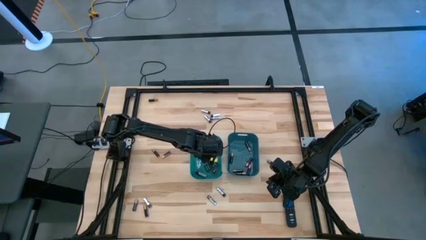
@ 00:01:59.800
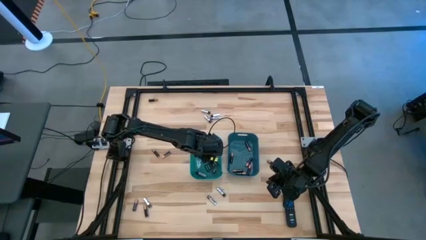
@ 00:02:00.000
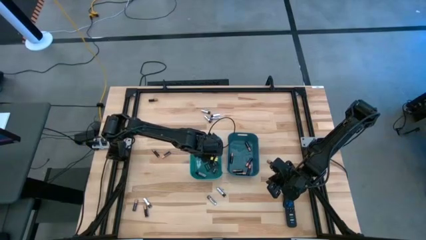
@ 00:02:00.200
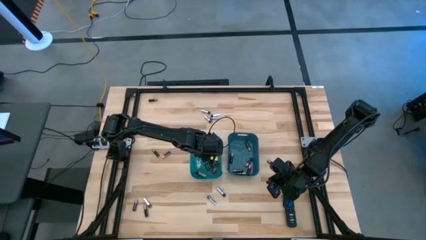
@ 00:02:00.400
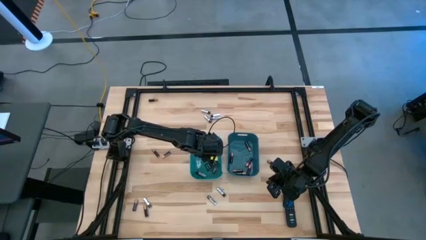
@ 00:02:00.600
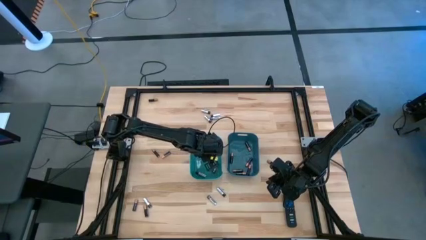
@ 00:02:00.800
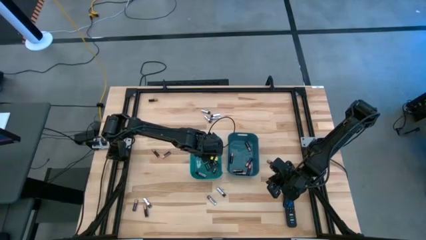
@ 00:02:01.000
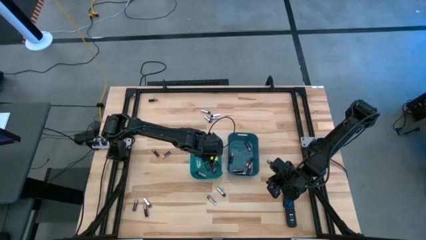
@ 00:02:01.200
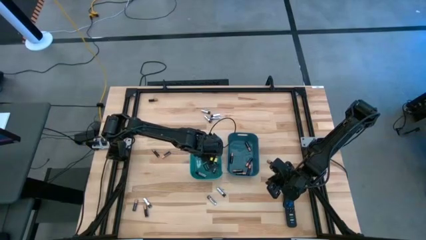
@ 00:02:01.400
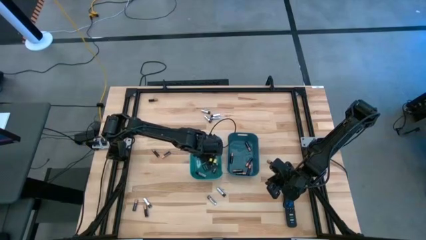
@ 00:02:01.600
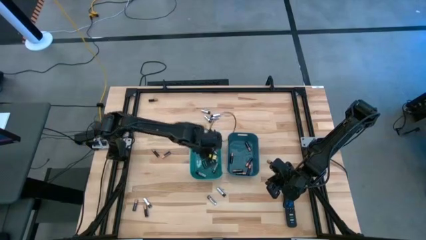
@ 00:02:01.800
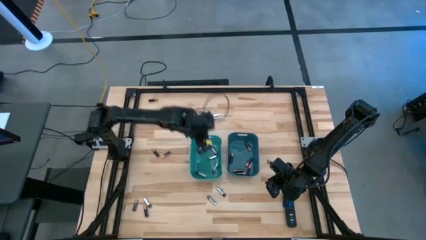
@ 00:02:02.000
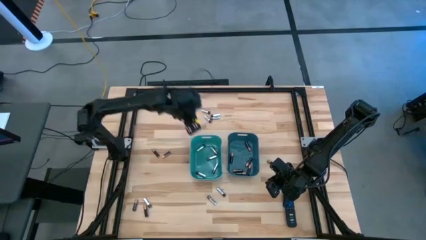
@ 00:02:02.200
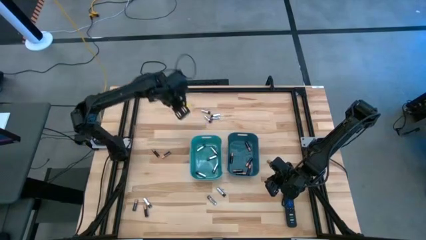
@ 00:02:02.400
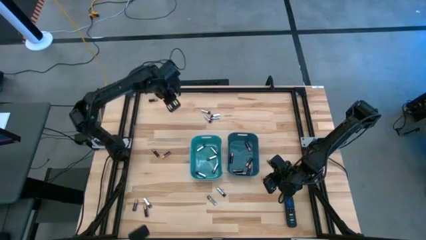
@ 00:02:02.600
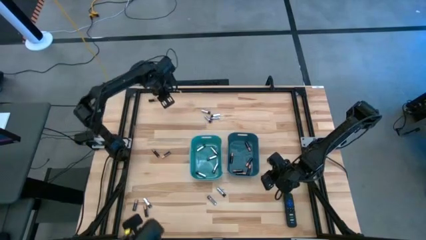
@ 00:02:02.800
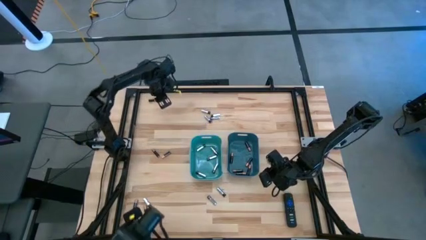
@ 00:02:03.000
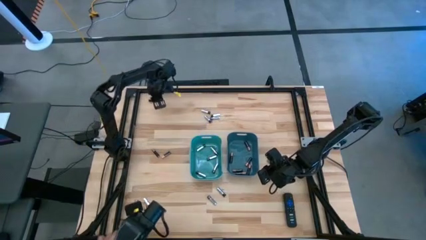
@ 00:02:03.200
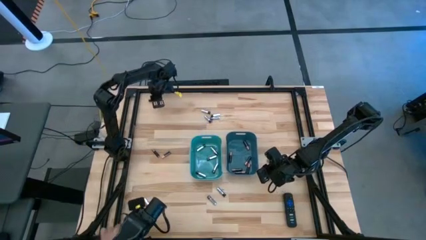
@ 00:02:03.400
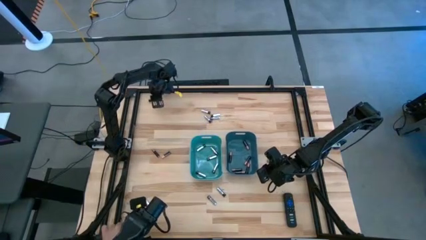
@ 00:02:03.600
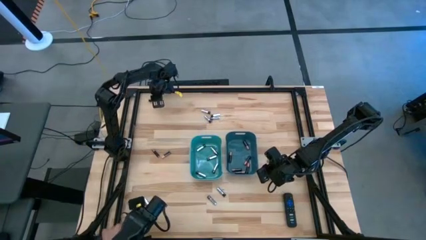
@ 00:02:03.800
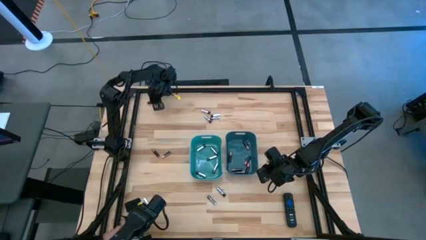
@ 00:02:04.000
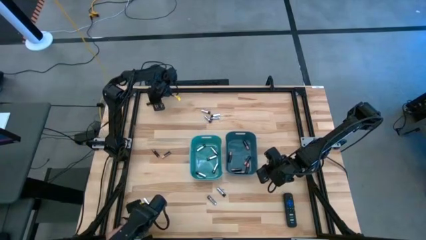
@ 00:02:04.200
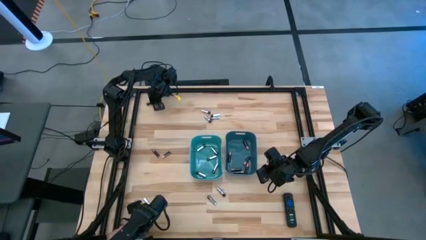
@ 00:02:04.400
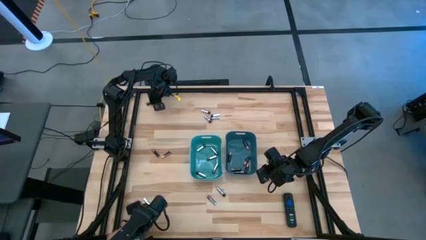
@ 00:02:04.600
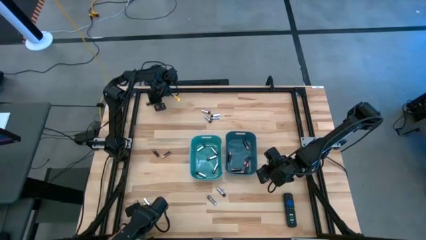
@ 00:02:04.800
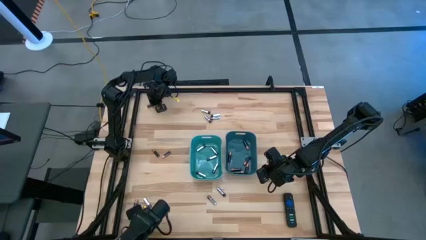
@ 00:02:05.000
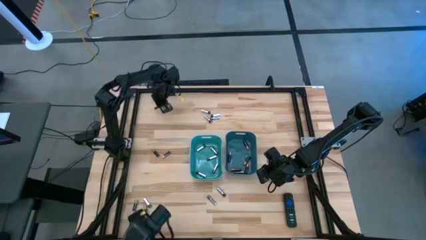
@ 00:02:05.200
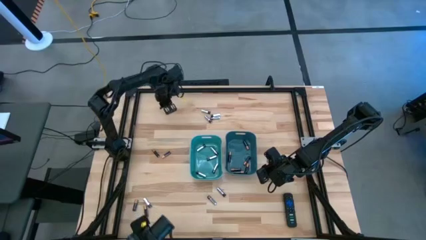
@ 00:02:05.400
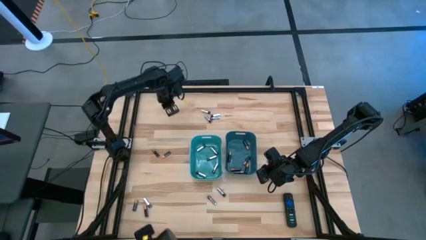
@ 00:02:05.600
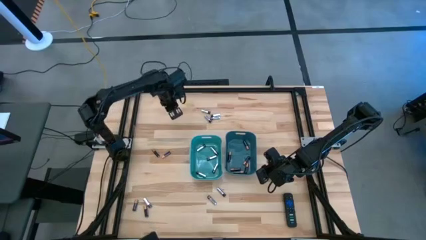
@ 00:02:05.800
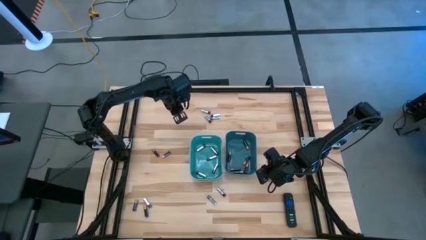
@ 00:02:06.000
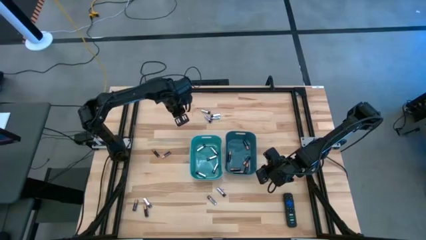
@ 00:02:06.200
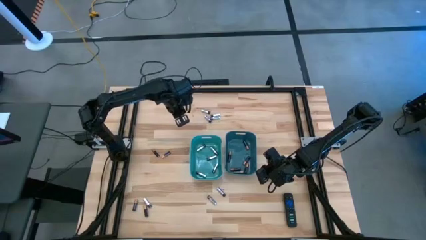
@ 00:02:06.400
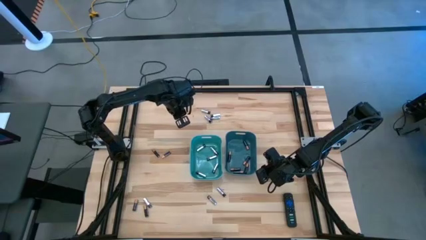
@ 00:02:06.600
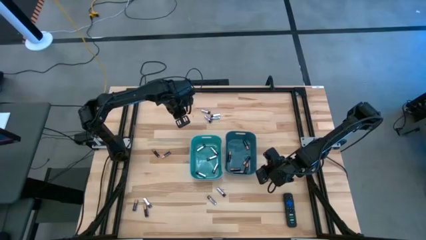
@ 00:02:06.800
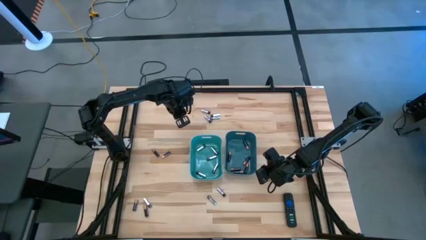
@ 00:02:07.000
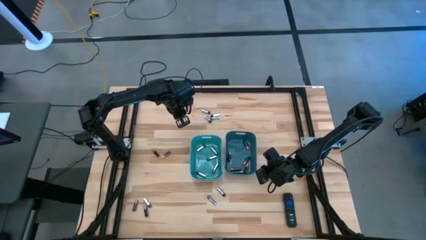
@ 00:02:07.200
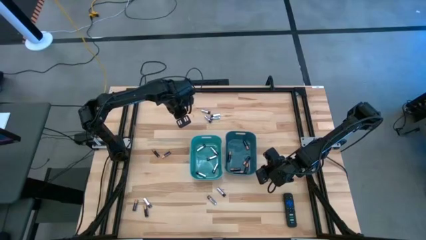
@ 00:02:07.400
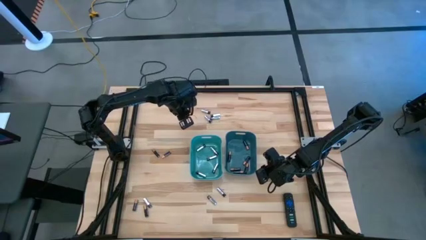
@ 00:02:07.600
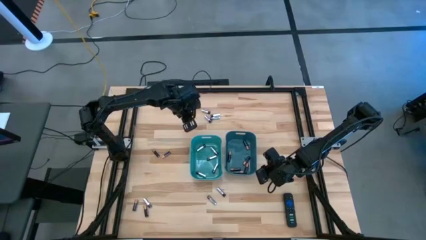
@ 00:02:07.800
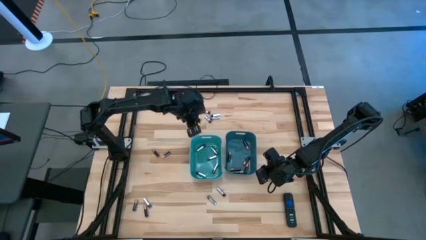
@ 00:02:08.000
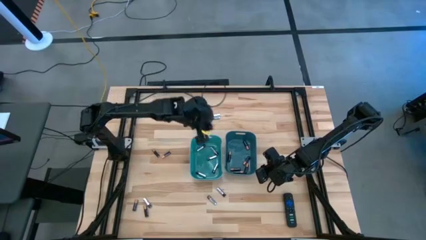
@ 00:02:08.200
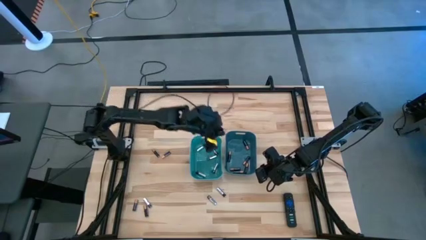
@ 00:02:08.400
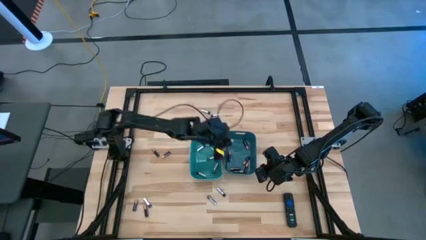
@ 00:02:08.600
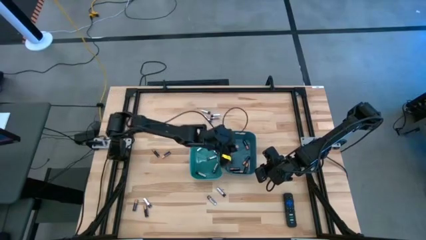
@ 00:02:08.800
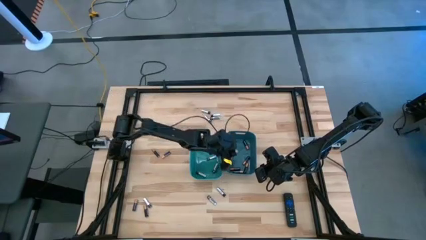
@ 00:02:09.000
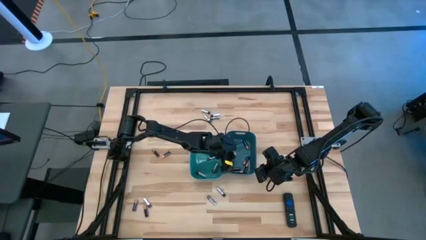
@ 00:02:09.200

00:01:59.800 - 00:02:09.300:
Task: Sort batteries
Put the black battery into the blue bin

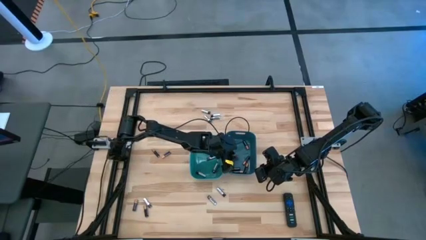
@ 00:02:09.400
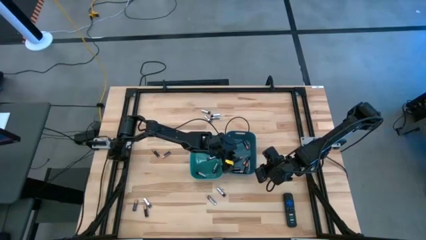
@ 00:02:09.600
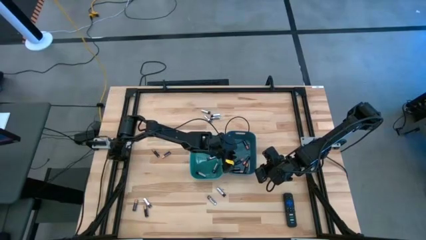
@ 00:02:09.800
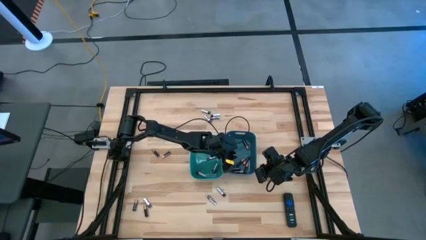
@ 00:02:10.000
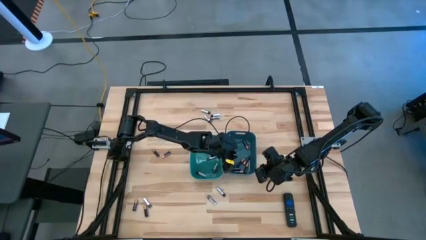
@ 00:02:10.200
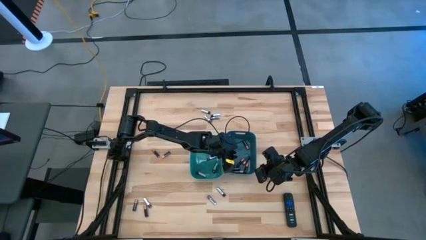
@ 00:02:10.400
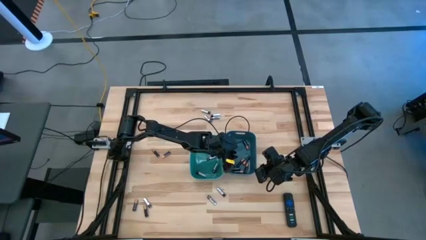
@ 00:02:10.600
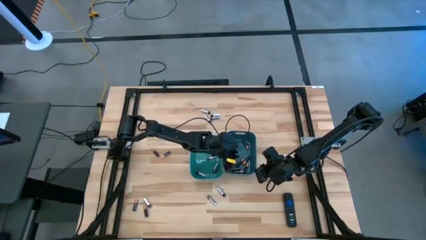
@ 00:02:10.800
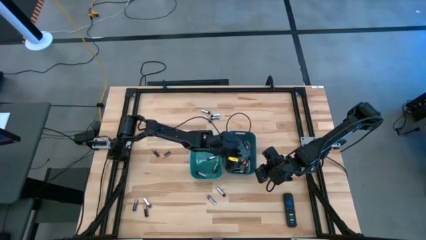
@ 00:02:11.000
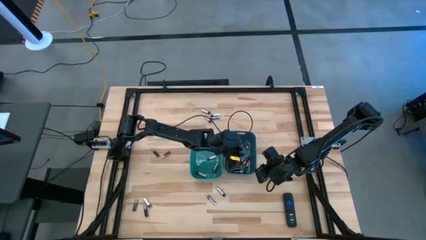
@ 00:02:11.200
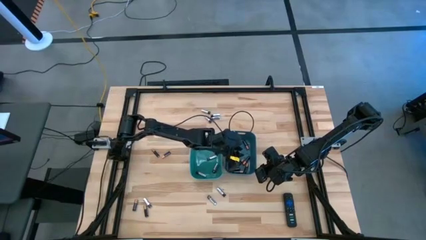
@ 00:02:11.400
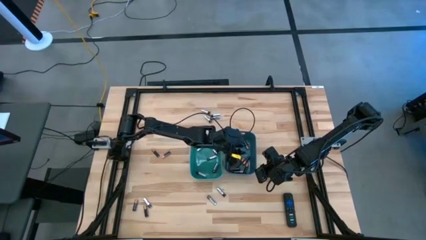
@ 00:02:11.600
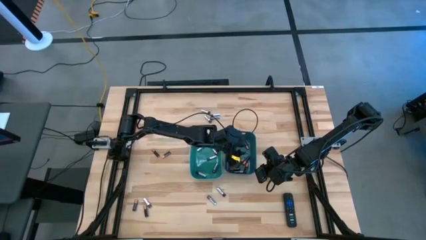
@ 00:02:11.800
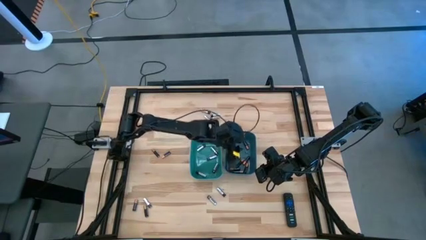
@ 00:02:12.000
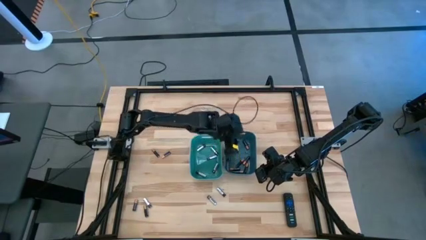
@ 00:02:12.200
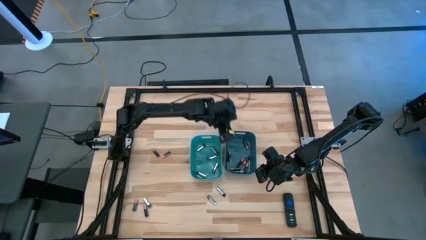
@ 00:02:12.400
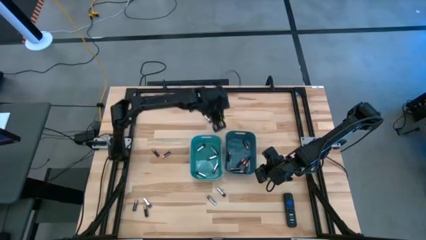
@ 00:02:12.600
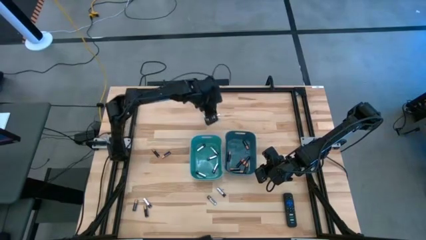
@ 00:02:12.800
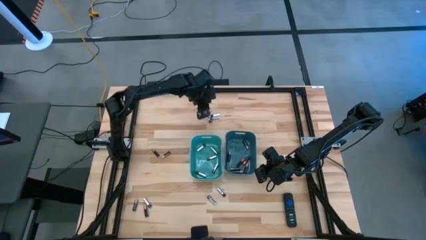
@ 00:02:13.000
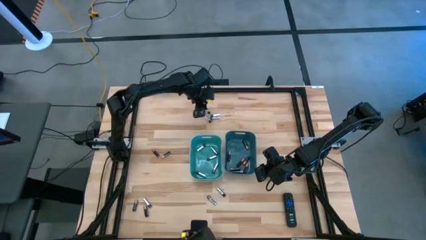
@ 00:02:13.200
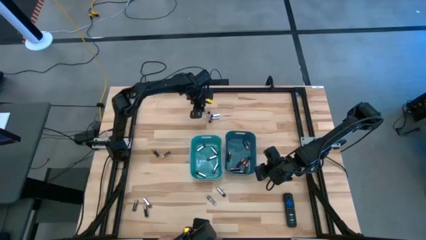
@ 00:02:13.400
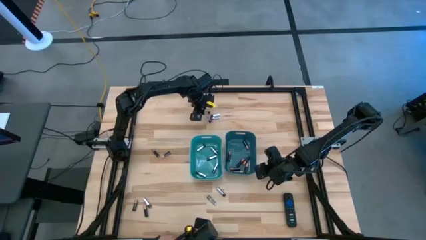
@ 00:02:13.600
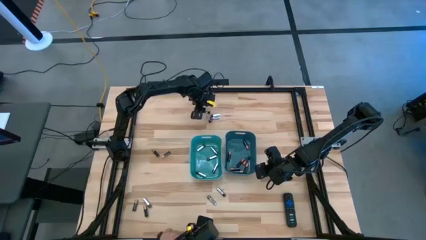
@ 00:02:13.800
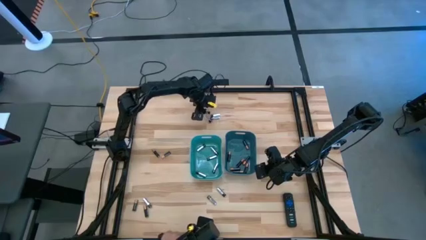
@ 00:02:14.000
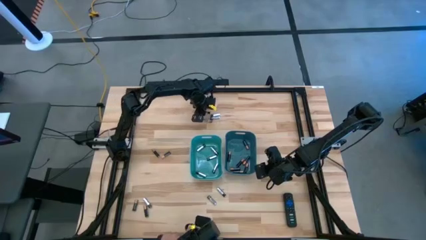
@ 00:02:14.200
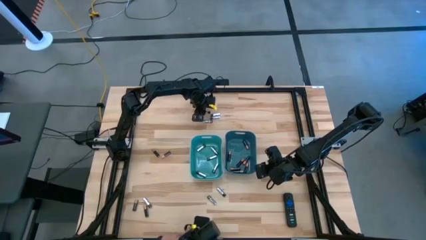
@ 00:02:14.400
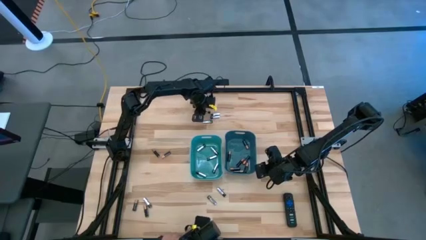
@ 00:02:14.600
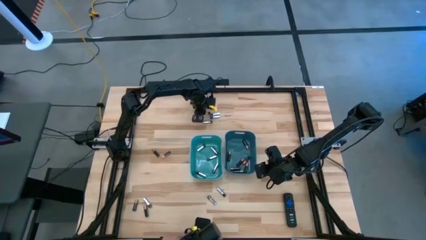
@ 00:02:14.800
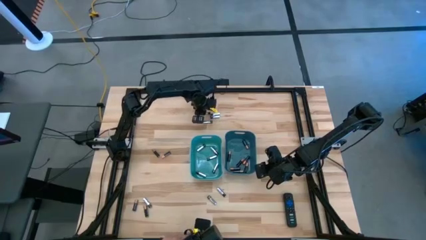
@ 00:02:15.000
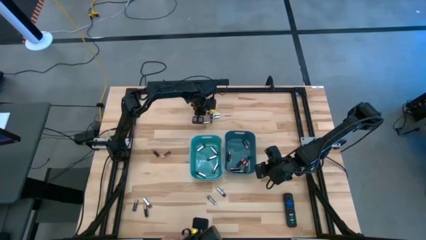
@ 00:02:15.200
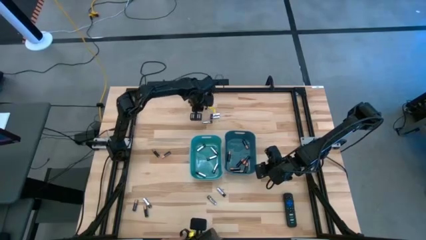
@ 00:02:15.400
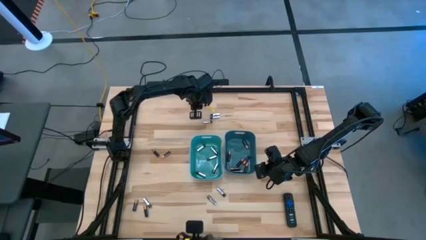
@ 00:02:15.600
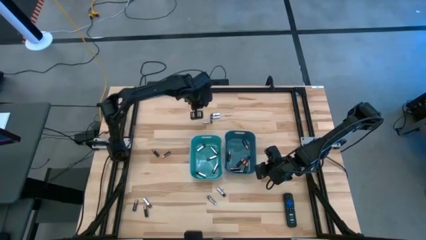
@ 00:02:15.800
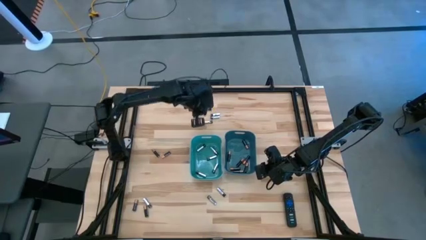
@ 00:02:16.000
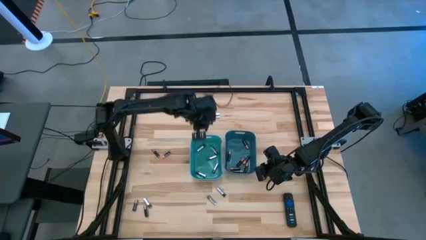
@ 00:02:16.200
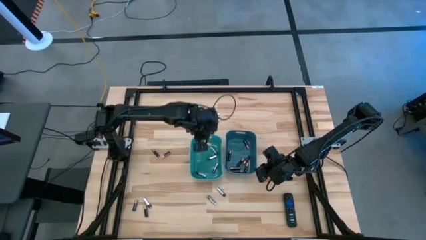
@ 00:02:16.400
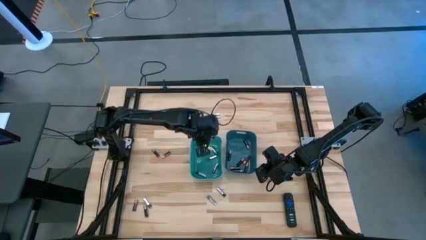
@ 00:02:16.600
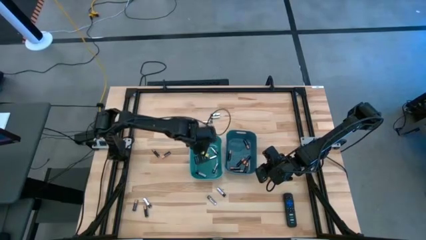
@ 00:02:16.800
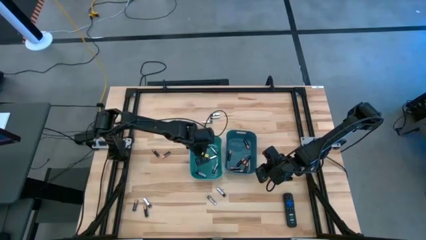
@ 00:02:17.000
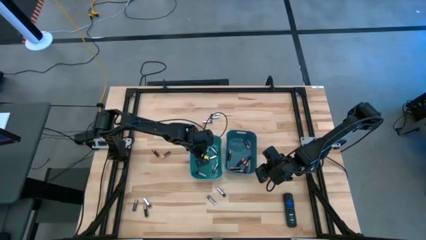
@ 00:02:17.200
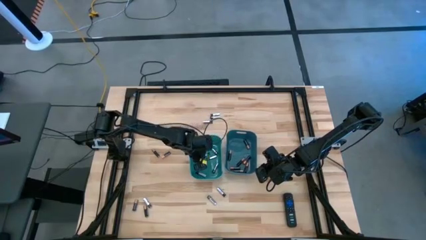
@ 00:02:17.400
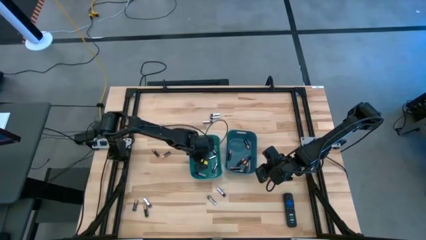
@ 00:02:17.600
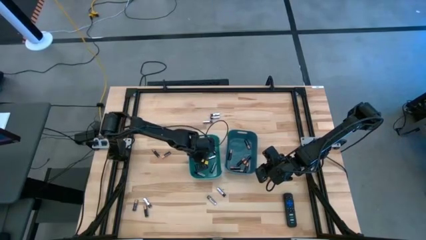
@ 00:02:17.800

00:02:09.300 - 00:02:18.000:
Put the silver battery into the green bin
